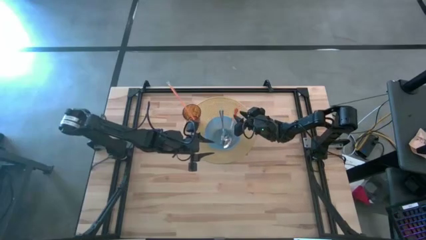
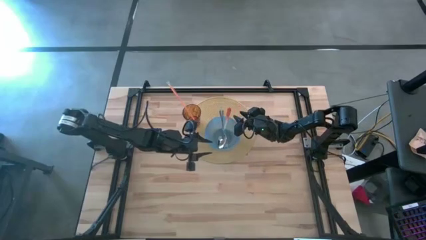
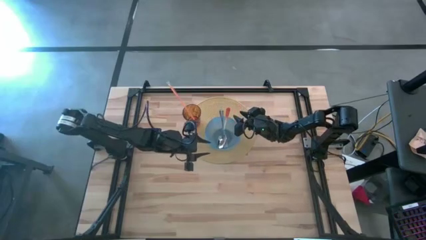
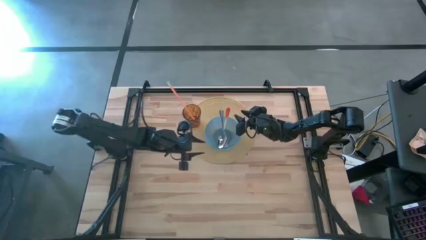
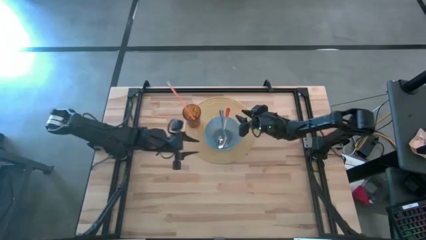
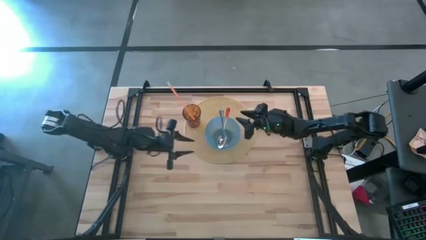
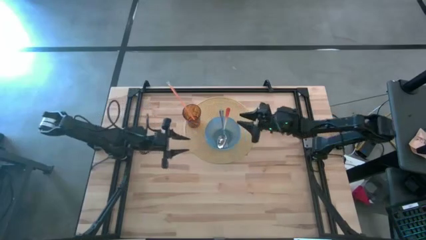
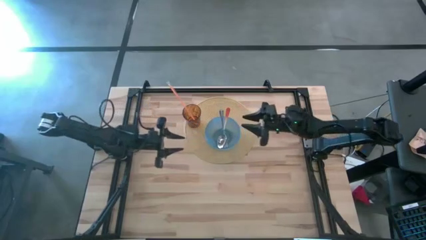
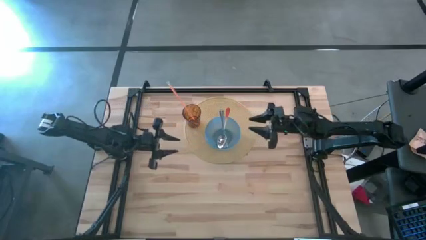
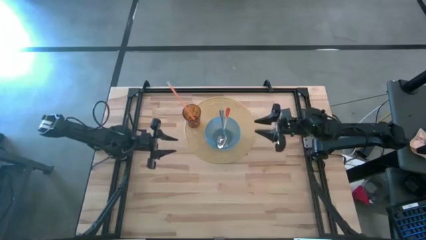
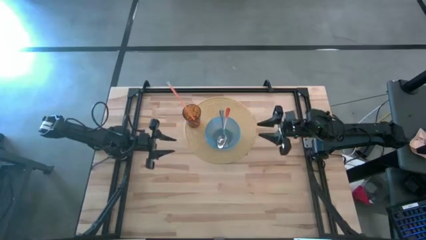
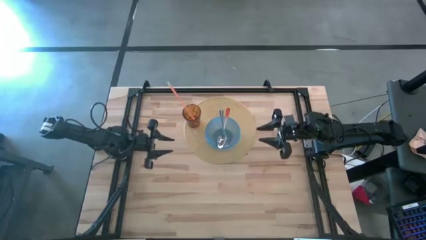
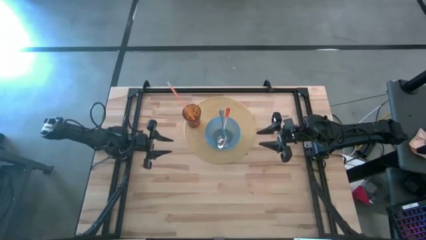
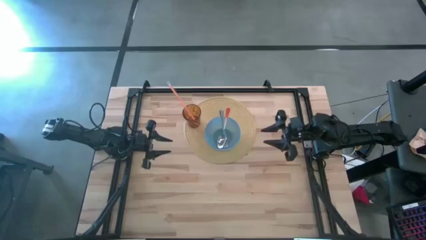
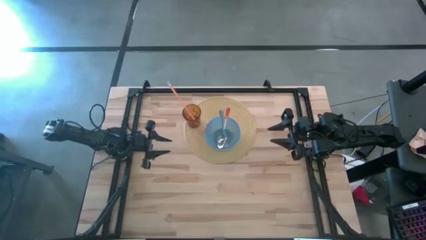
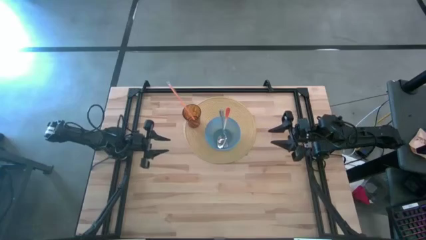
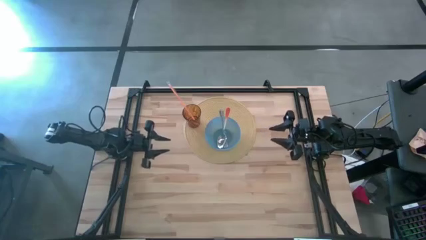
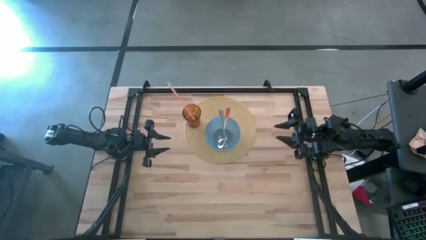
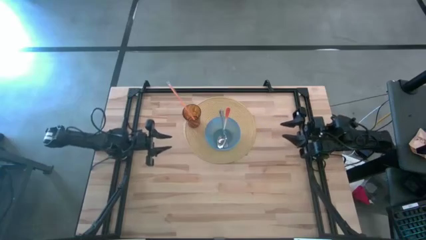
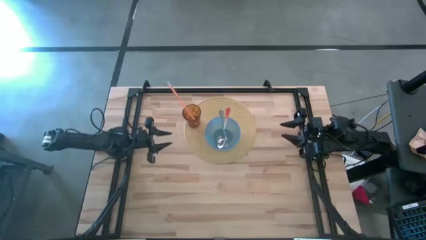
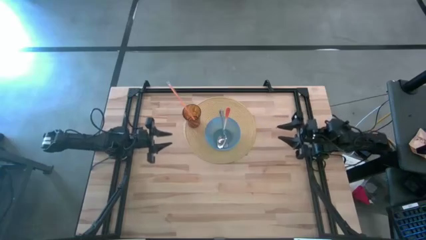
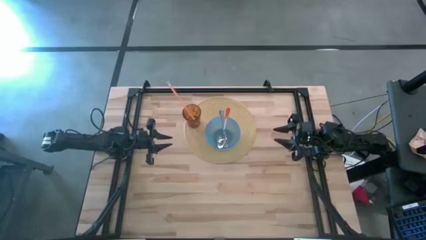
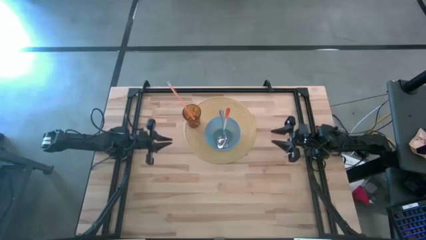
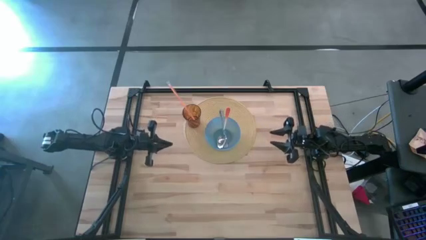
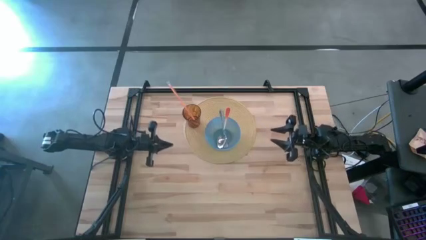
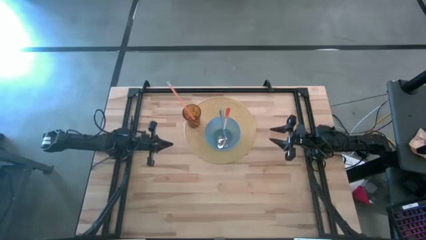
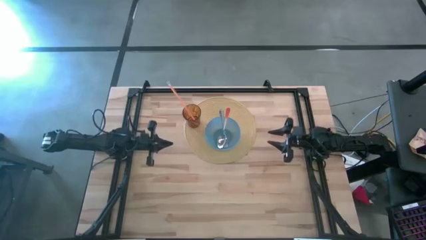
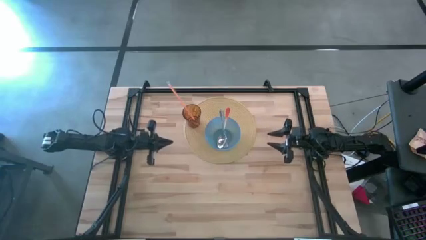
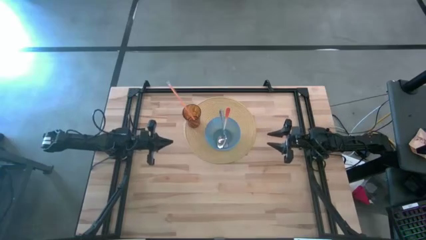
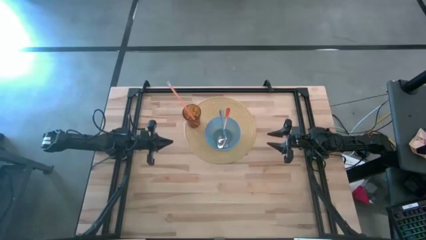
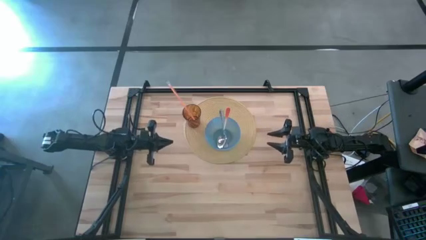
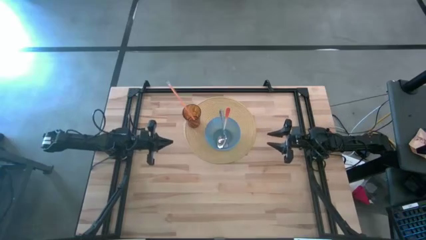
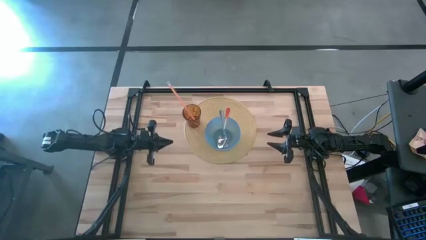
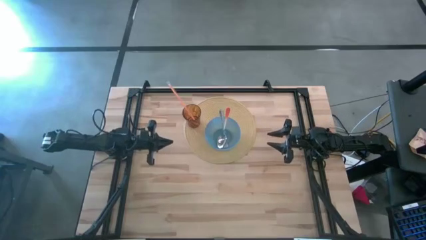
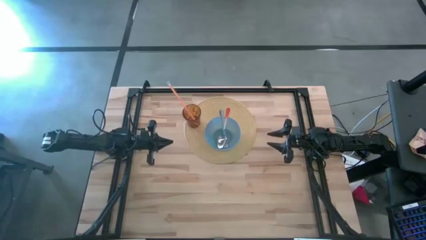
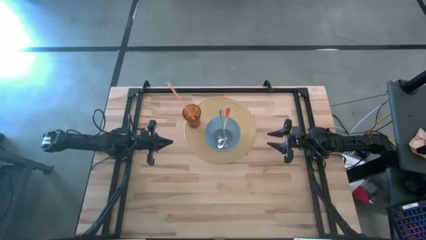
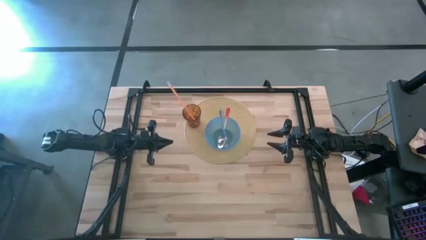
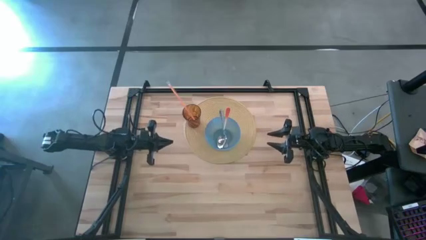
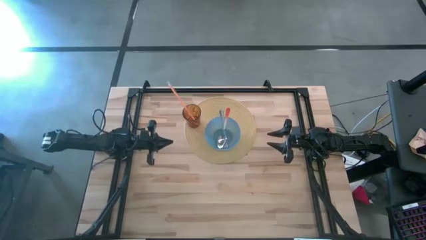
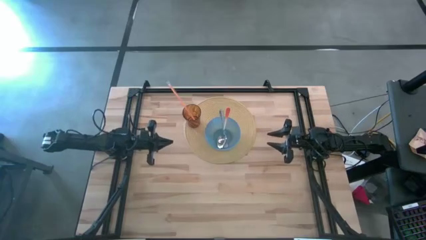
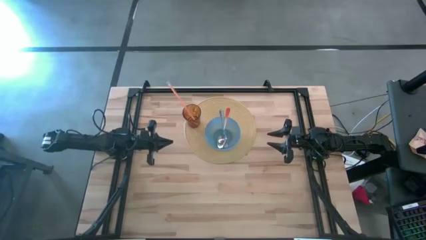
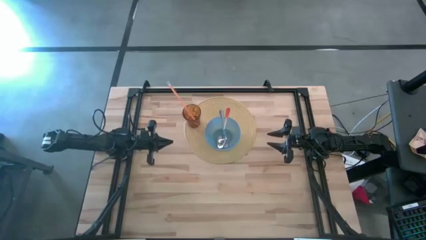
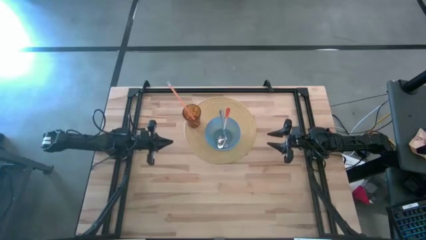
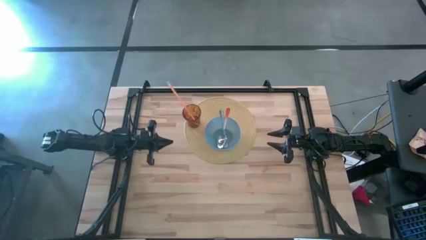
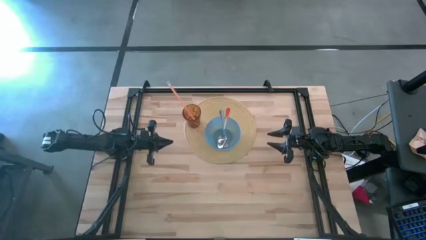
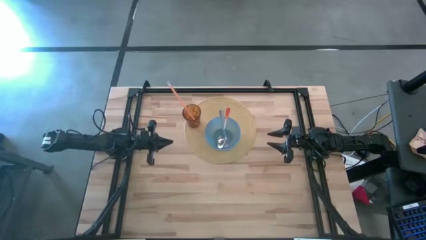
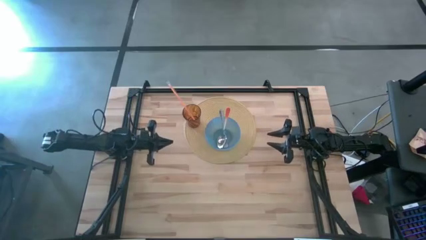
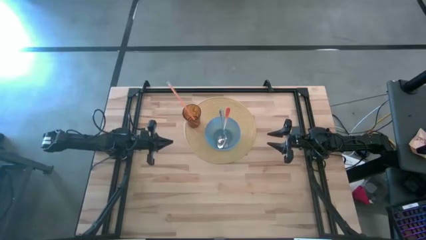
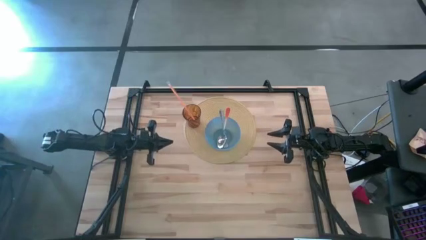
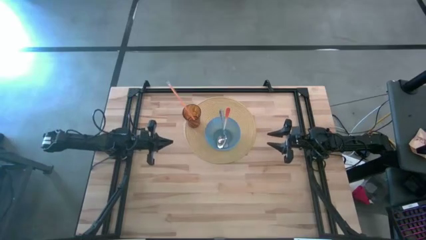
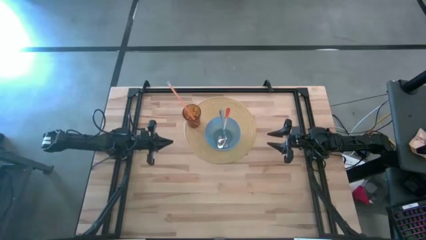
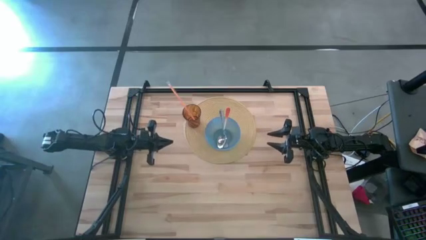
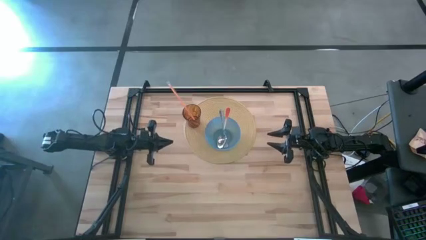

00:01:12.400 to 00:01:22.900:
Task: Pick & Place Utensil
Return to Home Position

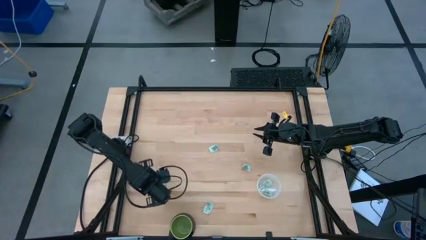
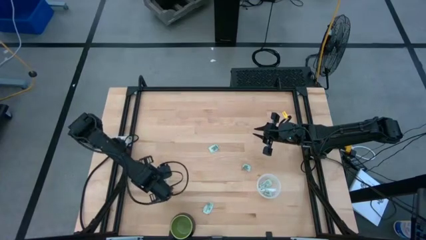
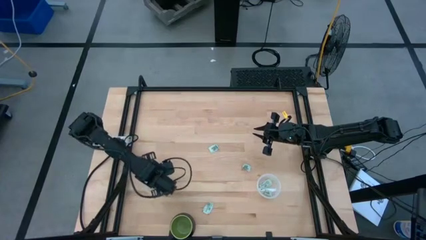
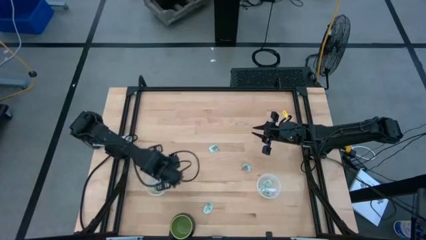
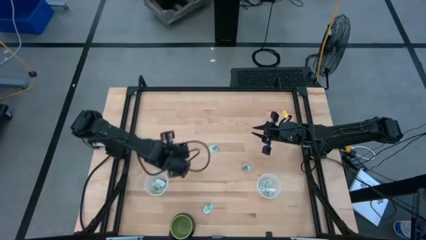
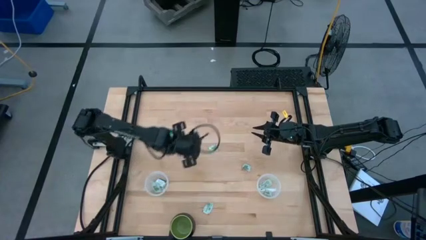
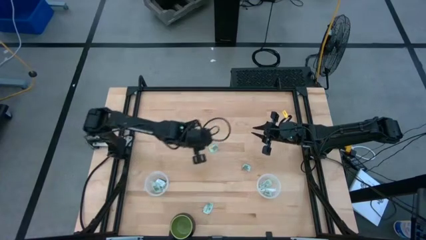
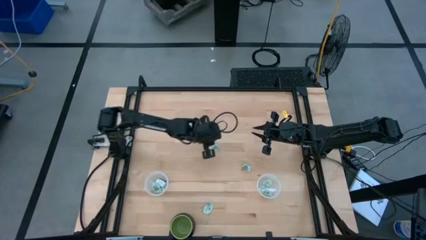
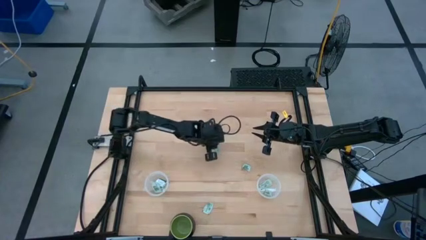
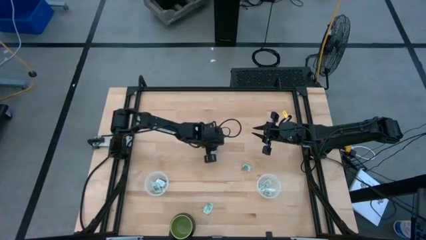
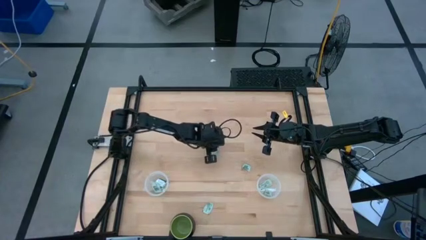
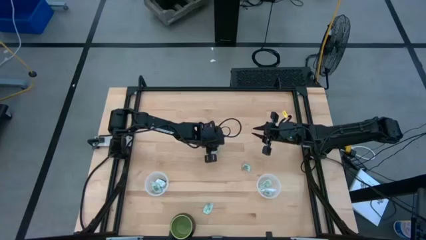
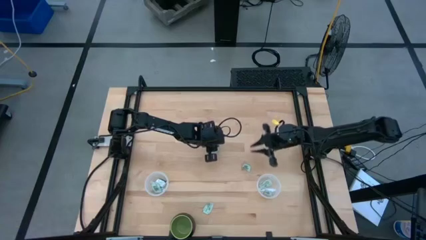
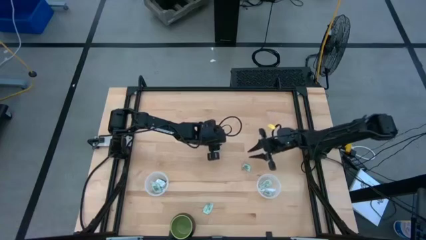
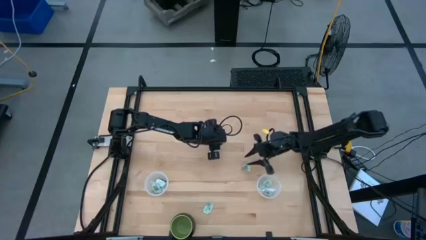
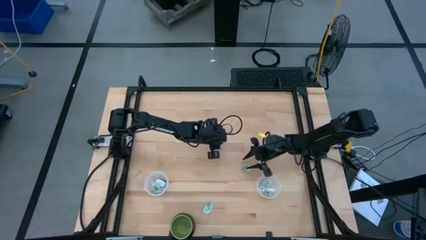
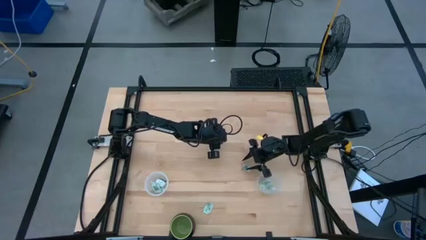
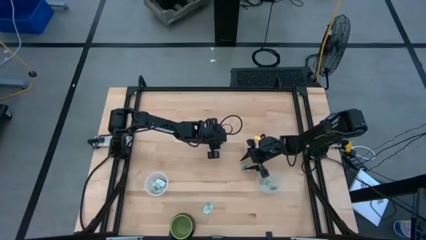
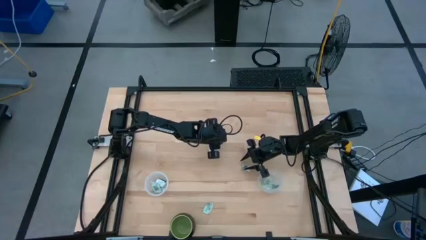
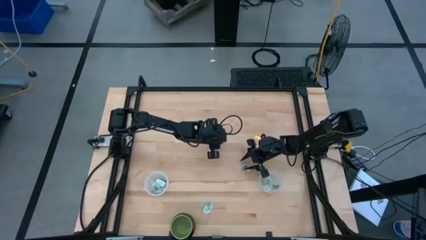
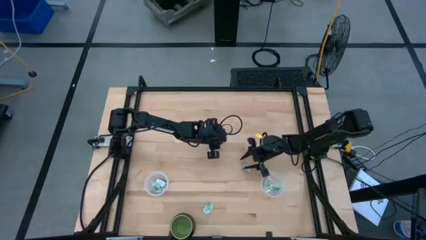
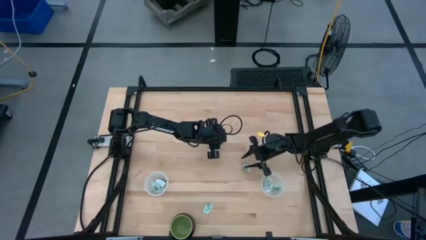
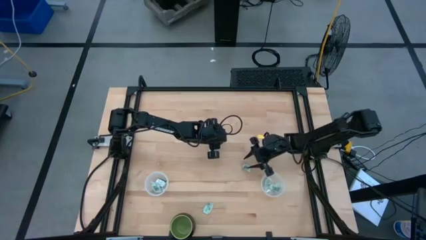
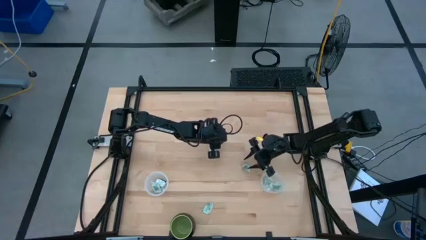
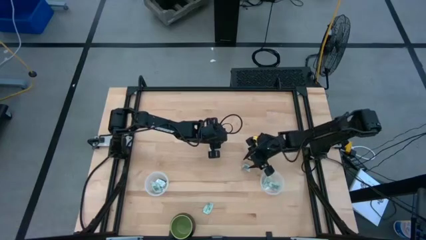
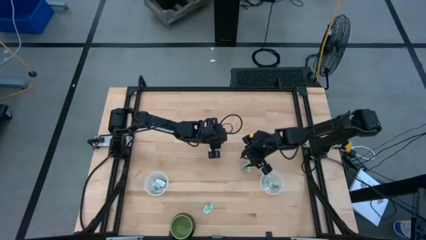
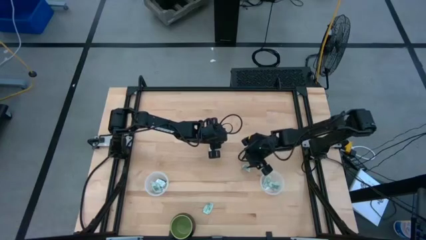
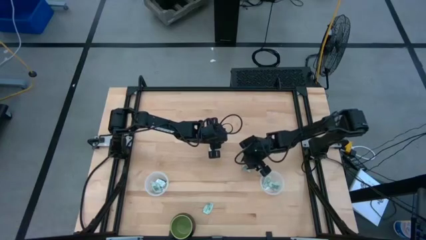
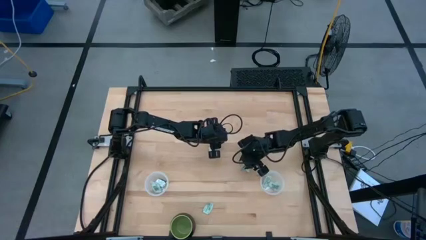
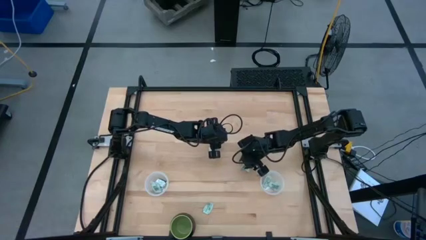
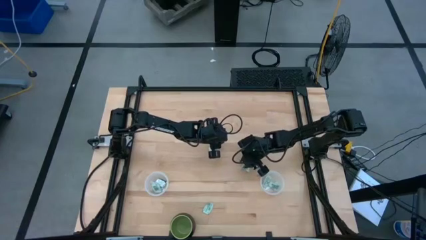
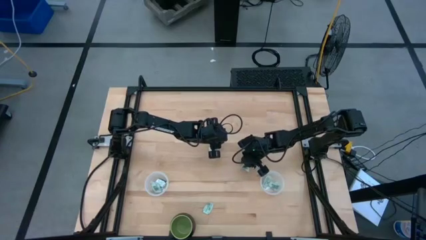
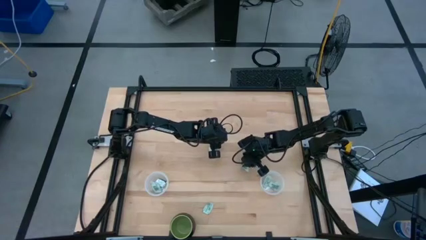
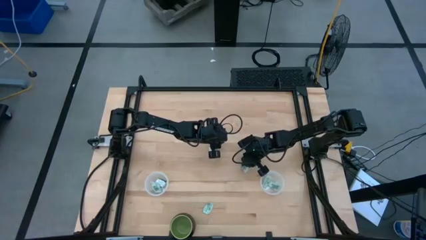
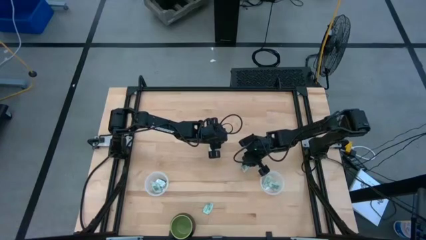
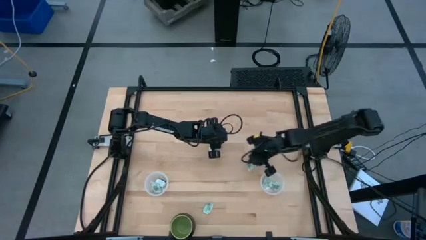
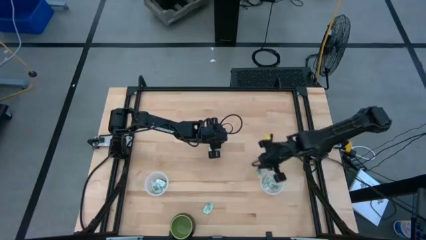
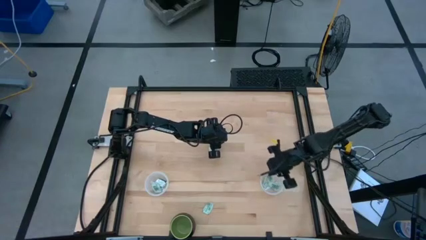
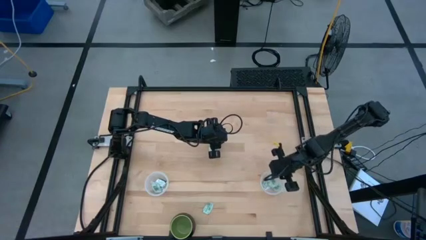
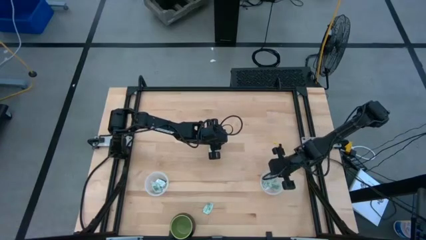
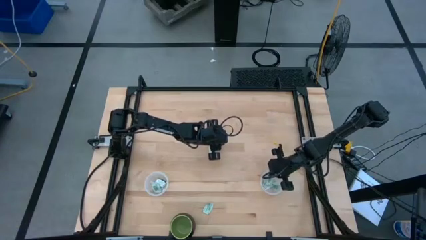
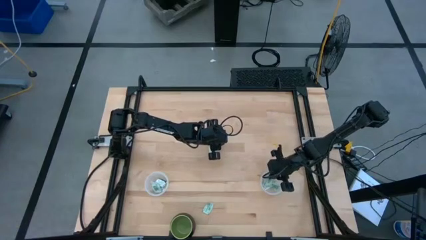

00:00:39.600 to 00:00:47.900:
Task: Pick and place Stevia / Truvia into bins
Put the white stevia packet into the right transparent container
